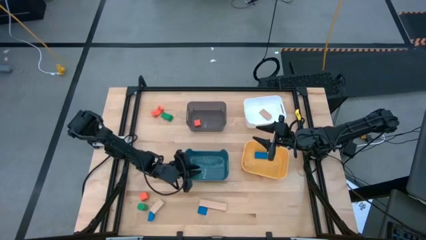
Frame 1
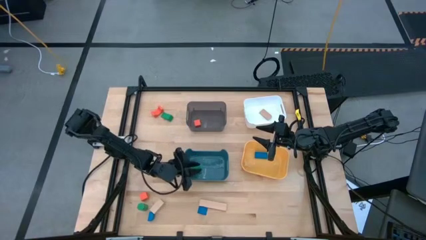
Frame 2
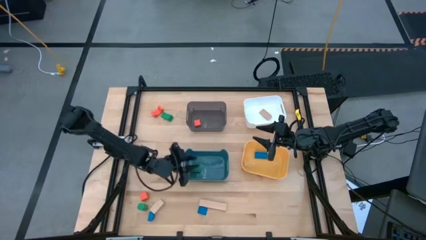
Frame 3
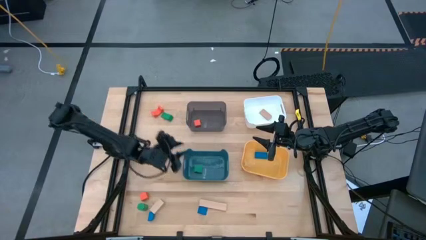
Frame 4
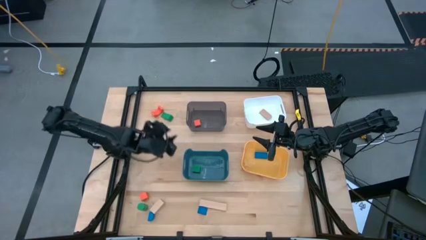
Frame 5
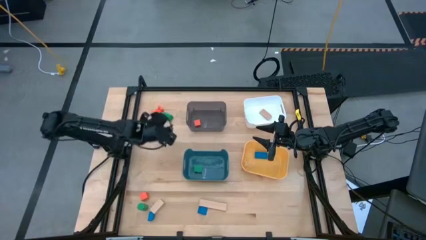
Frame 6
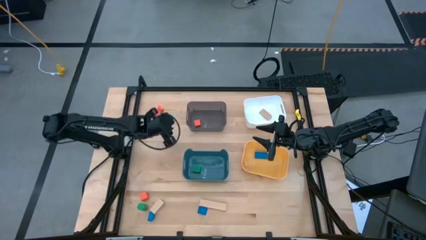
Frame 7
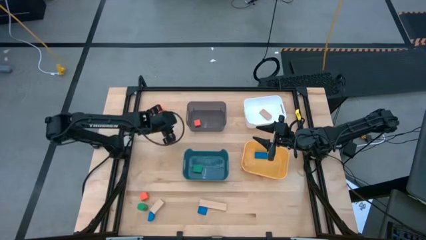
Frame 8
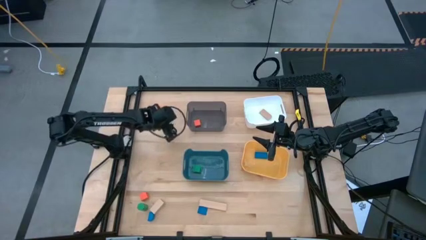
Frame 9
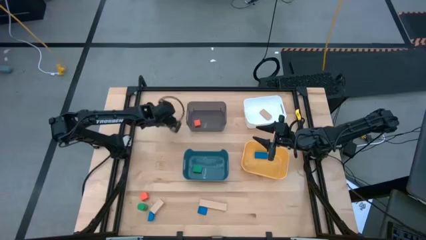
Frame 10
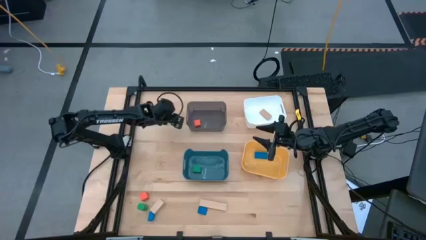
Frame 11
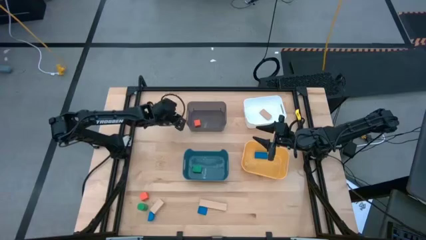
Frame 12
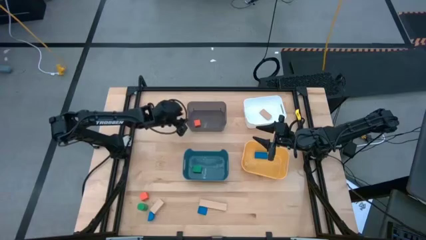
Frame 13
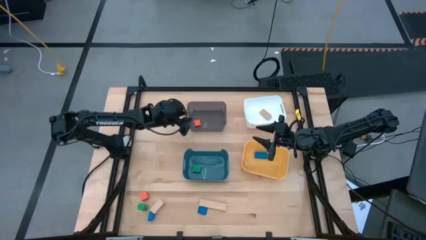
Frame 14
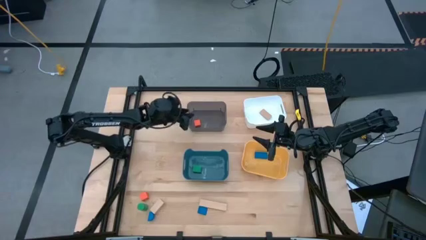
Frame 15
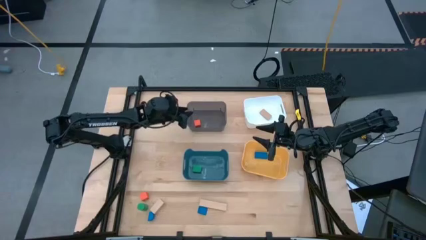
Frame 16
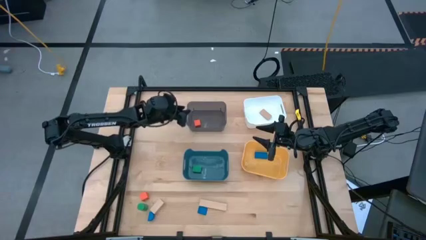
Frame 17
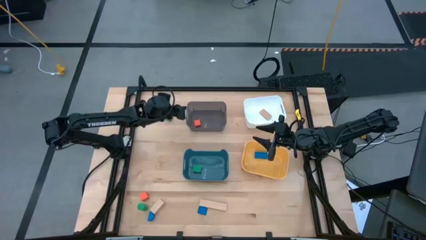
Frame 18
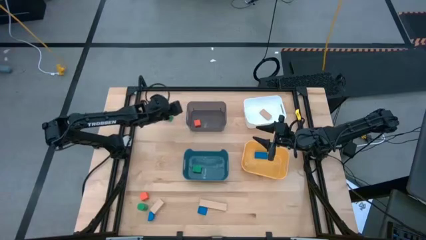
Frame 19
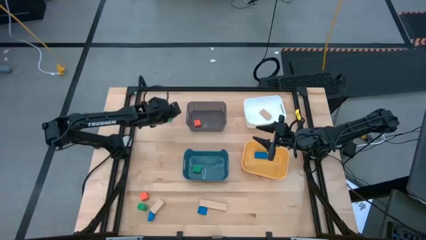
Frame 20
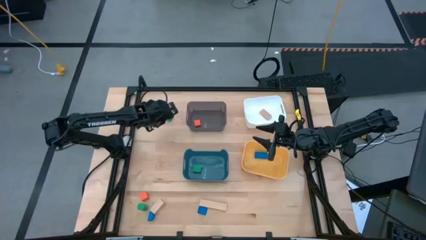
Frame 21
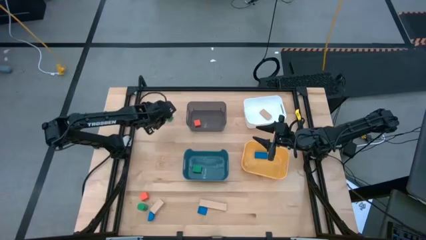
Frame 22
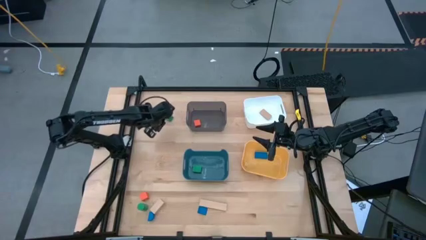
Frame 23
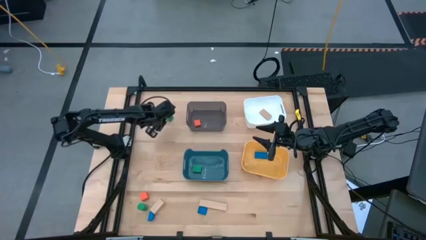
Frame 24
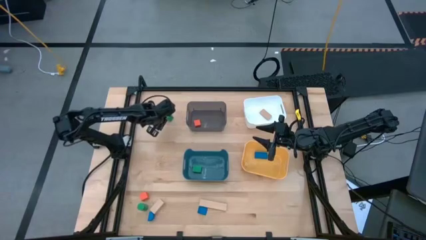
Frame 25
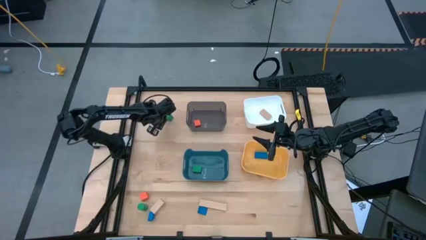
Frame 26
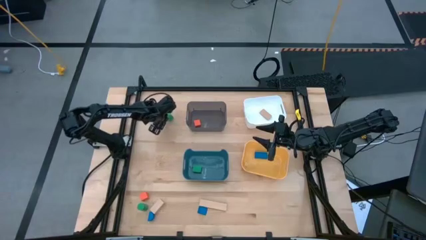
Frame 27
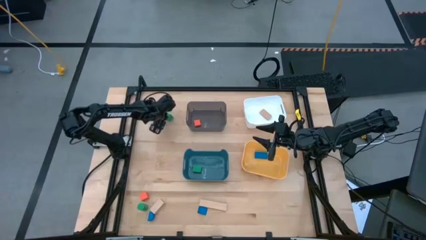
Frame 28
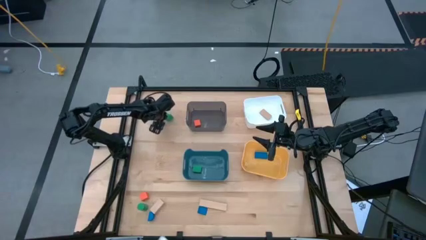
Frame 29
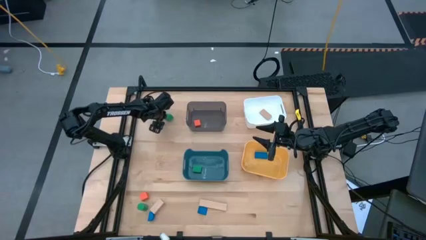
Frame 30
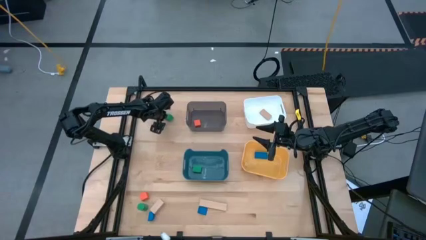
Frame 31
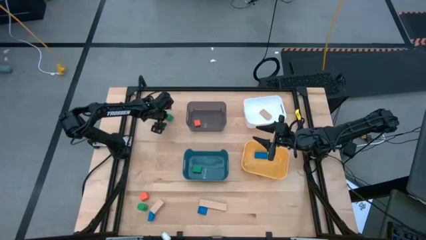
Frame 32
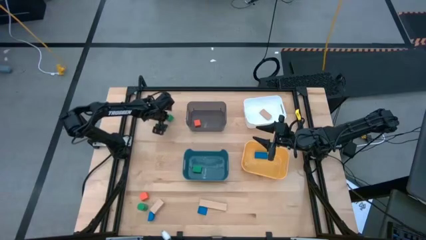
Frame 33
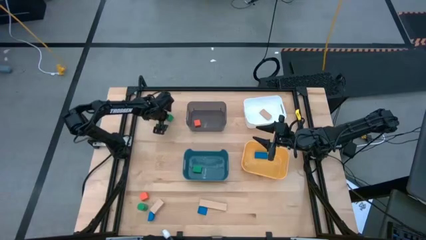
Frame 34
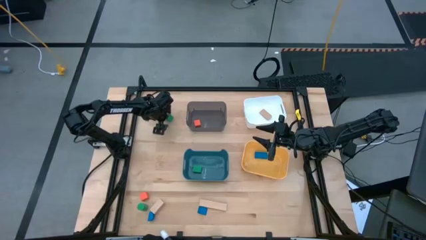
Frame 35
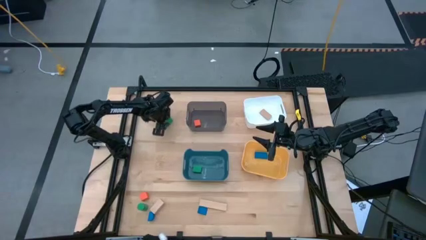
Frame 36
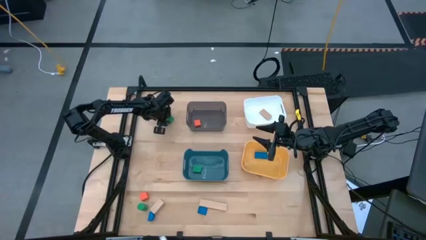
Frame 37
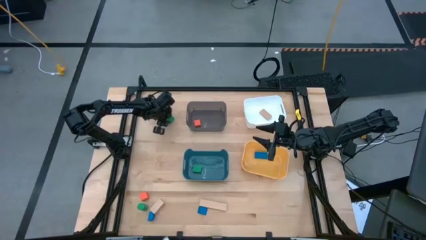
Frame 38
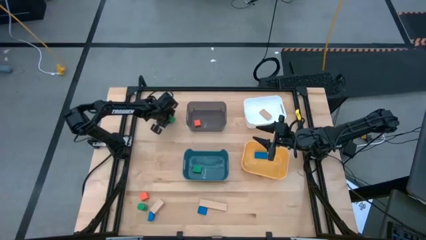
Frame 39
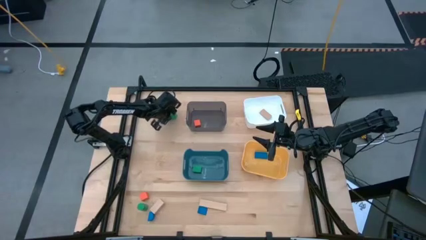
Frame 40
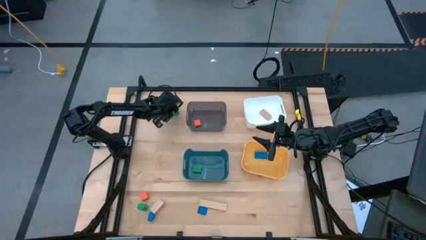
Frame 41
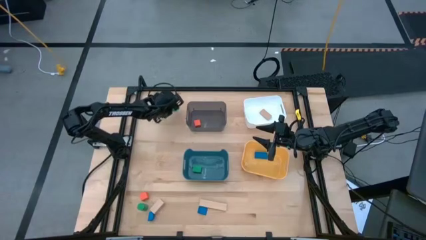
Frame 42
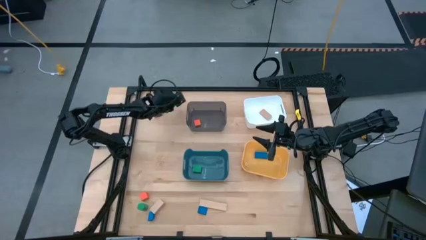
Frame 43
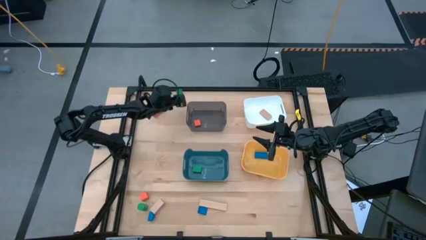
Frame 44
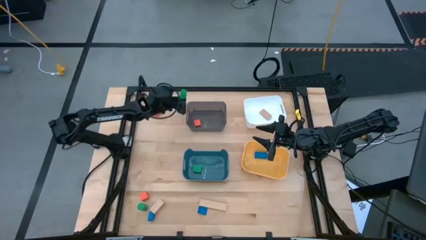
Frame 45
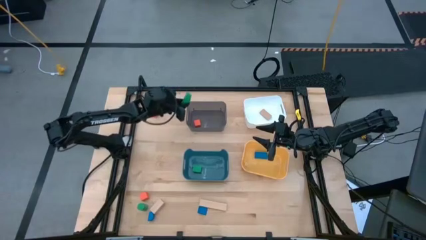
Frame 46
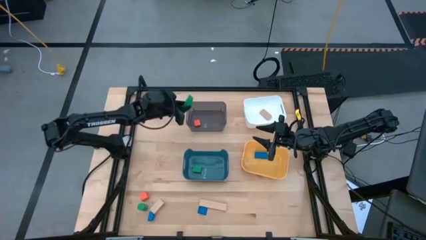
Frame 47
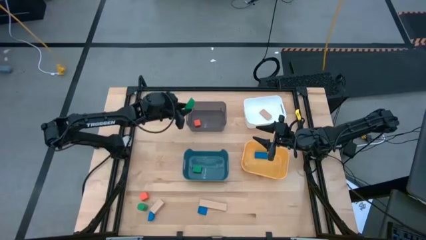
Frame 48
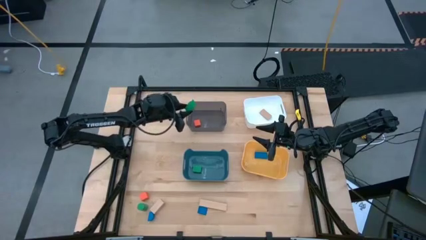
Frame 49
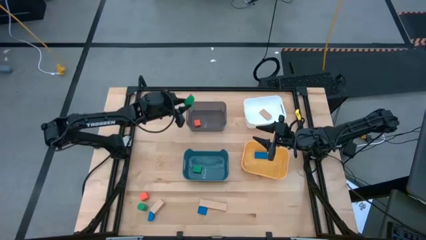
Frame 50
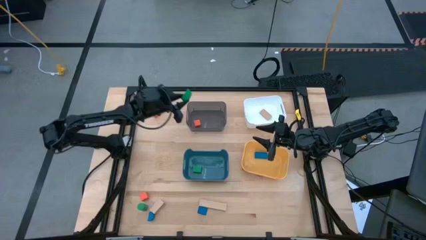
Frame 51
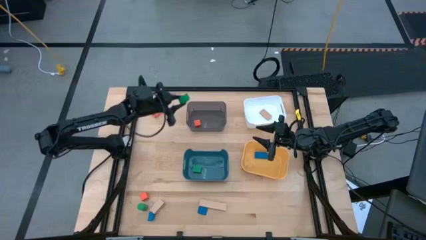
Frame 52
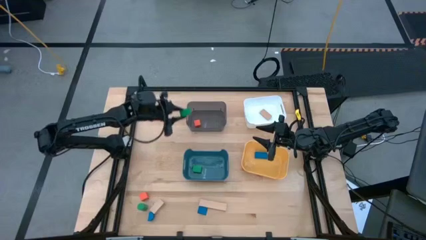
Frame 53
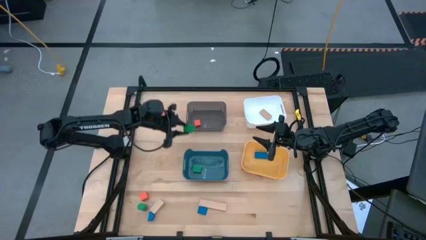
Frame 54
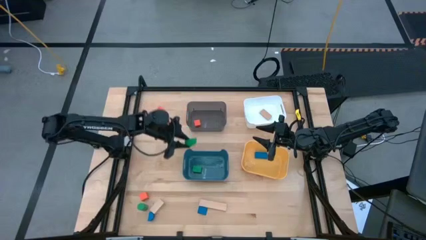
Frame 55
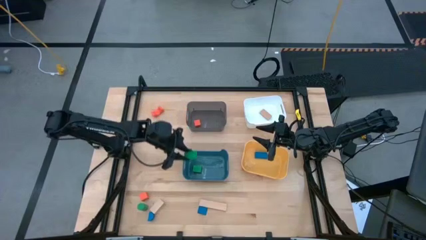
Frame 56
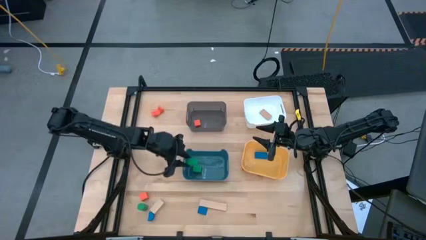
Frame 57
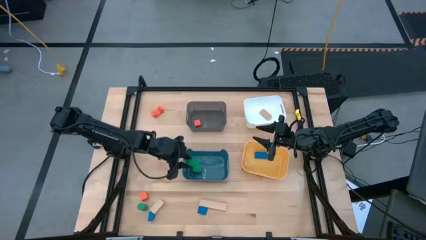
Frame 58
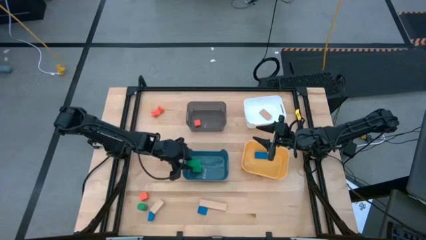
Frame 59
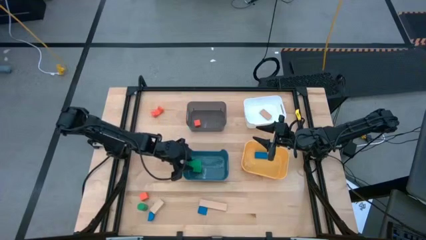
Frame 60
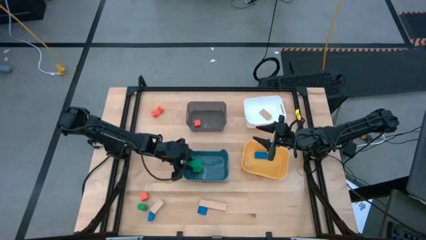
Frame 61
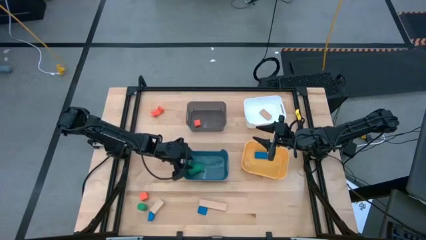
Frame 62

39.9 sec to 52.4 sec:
Task: Sort & place blocks by color
Put the top green block into the blue bin
